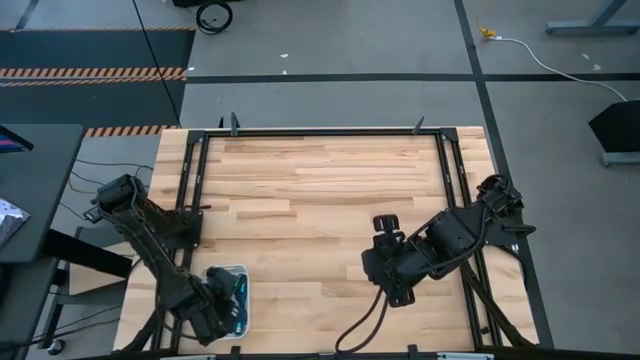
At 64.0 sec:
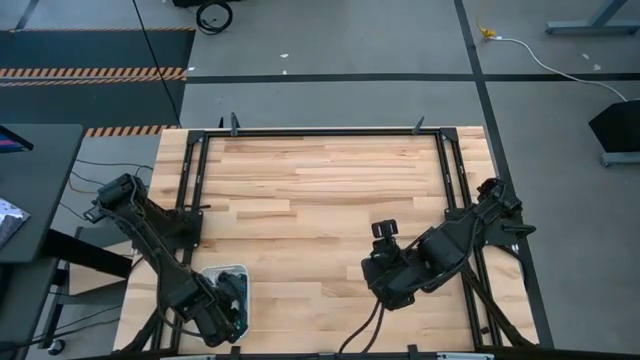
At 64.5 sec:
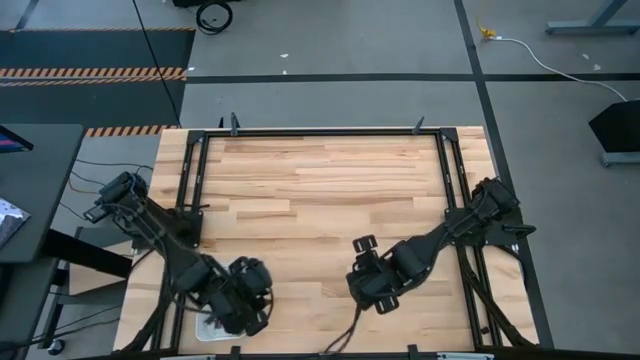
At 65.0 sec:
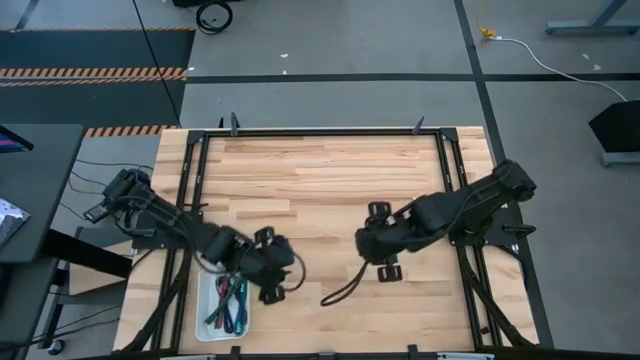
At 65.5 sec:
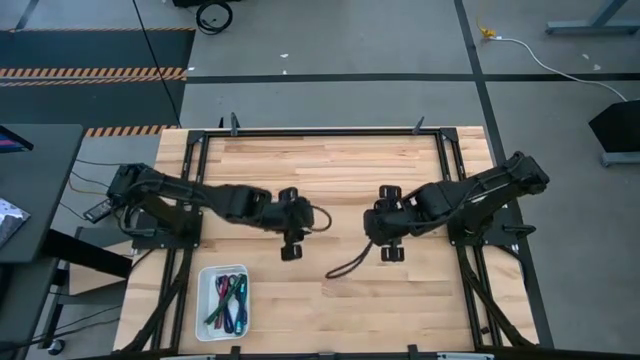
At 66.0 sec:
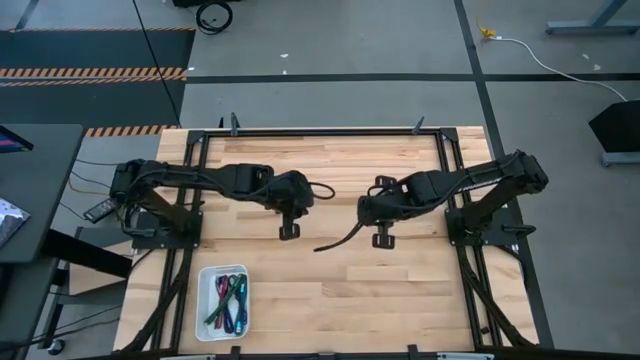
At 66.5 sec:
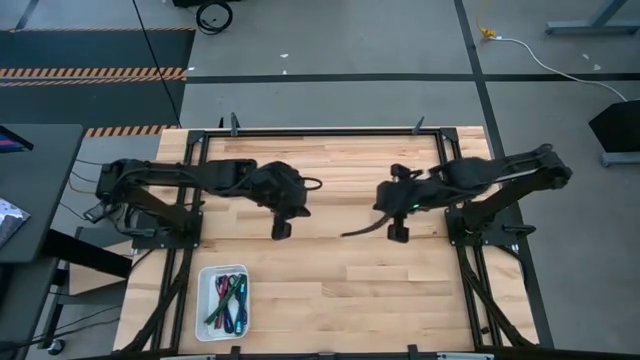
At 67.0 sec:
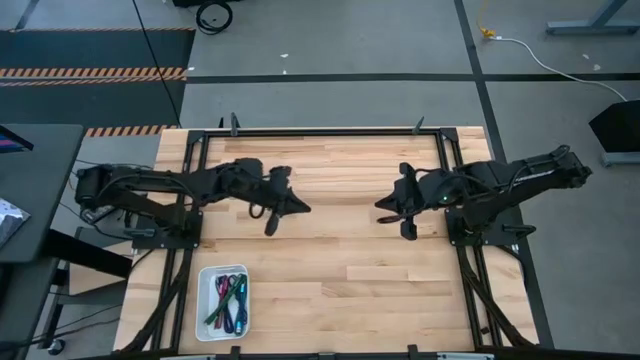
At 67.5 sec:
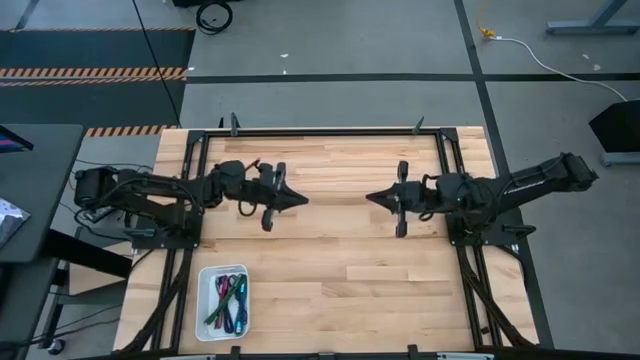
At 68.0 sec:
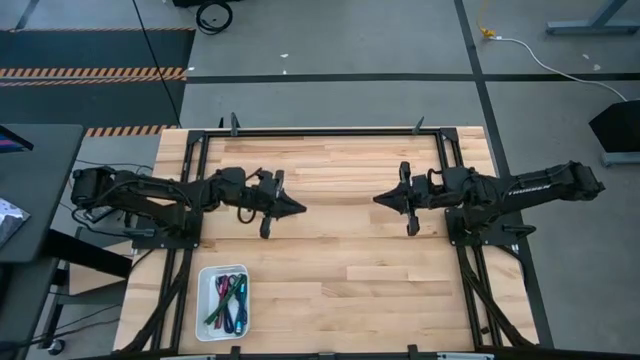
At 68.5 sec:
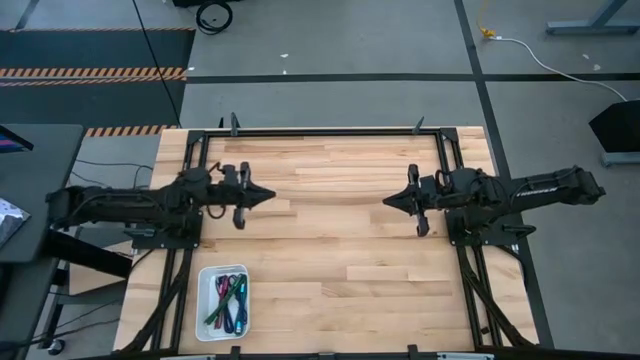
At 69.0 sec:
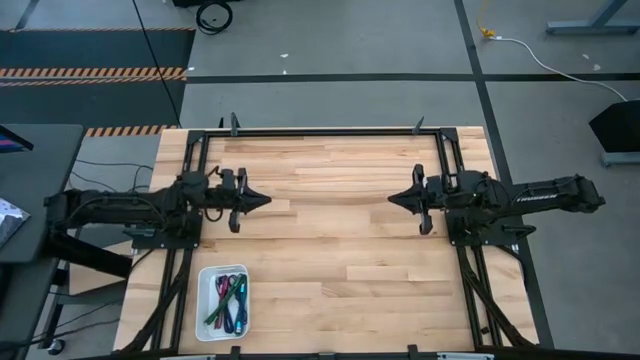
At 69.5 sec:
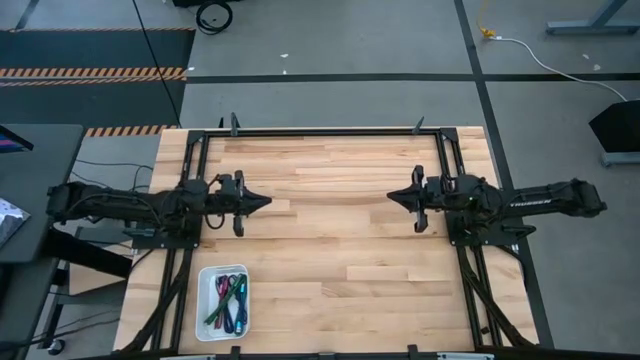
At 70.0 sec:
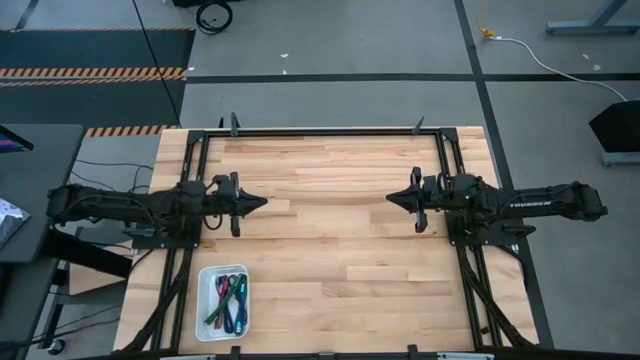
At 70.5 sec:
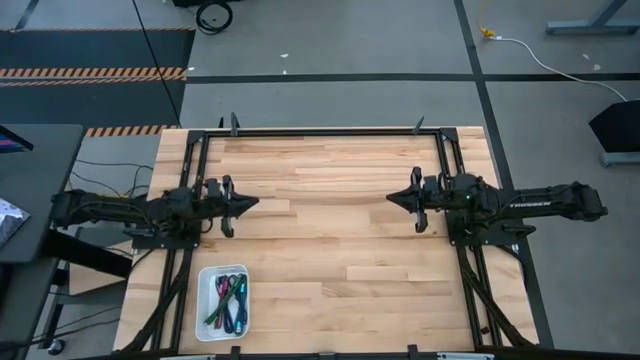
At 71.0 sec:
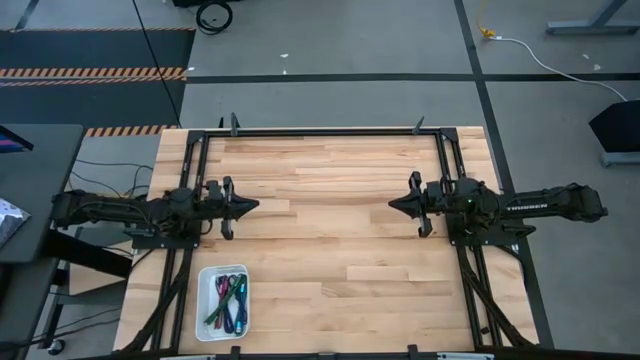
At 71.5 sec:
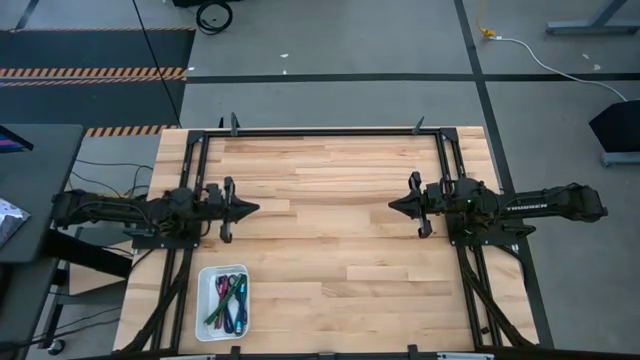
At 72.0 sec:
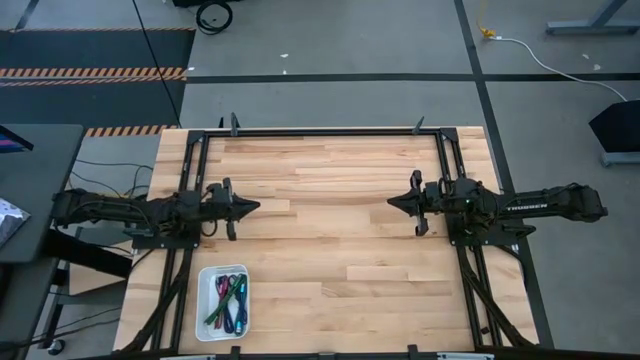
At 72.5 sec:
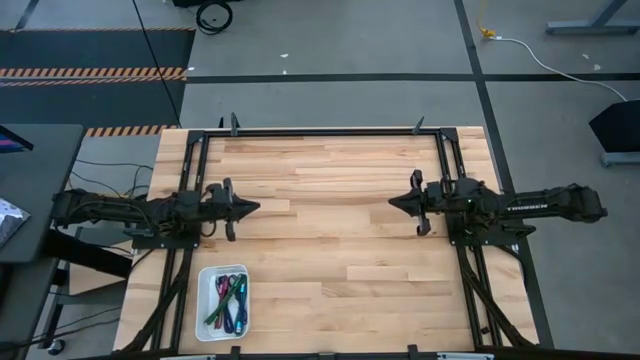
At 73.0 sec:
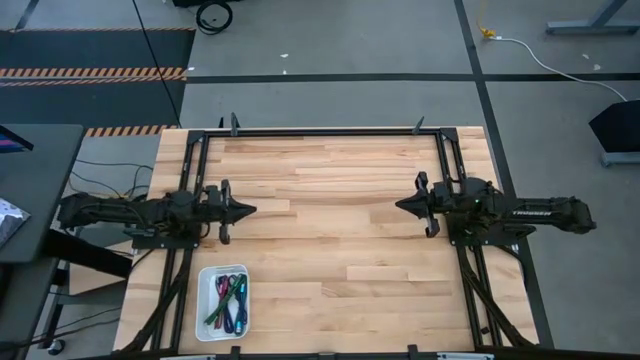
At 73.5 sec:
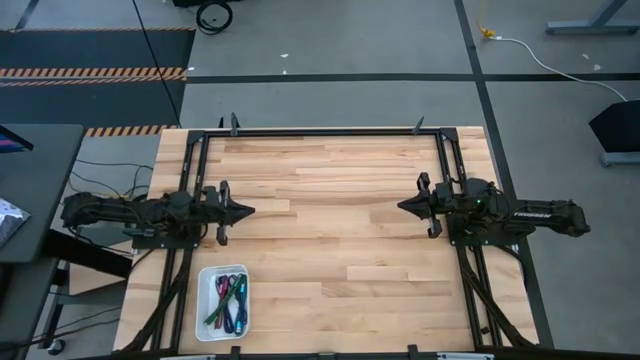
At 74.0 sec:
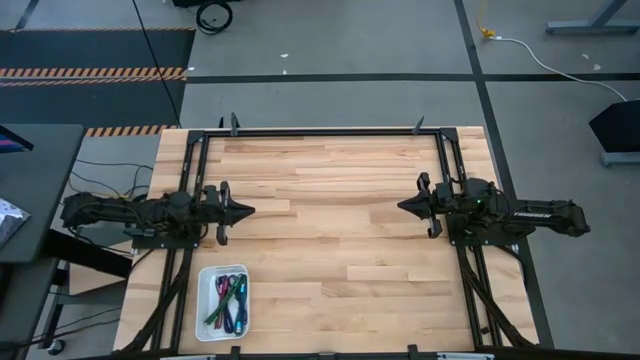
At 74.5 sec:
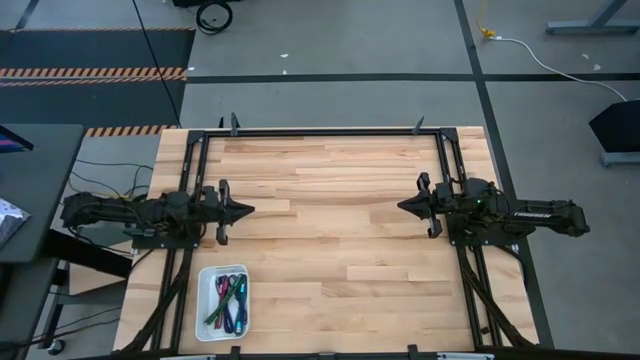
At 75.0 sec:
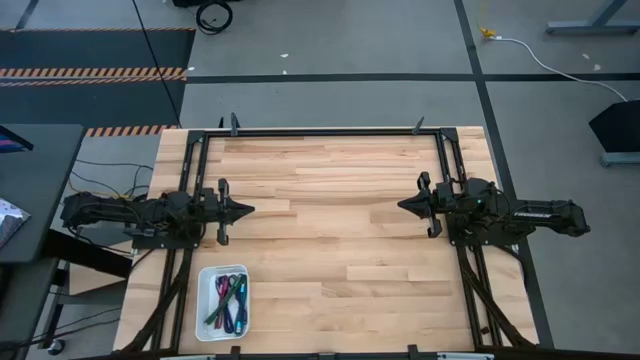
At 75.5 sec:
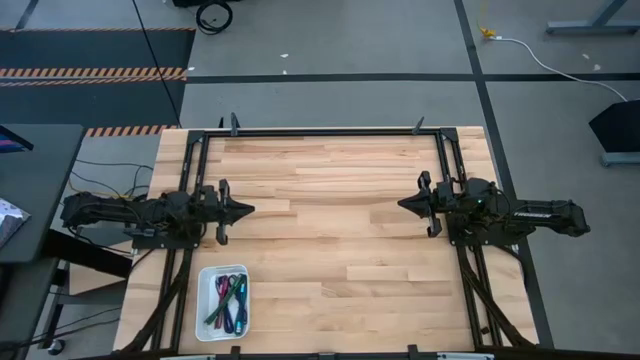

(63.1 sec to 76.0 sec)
Task: Pick and place USB-C Cables
Move the bin to the middle of of table

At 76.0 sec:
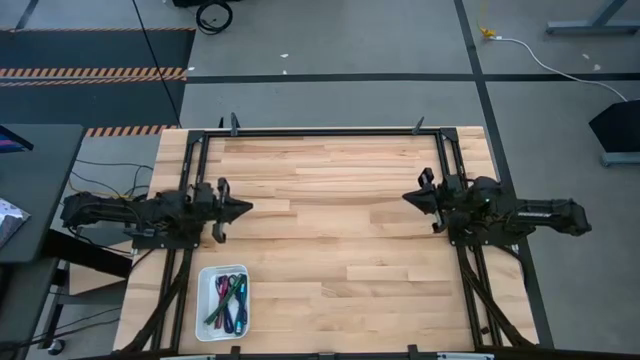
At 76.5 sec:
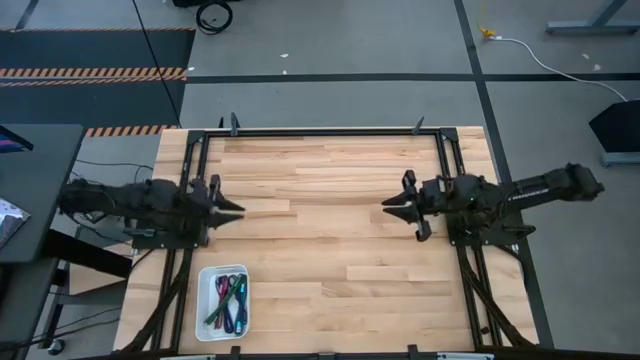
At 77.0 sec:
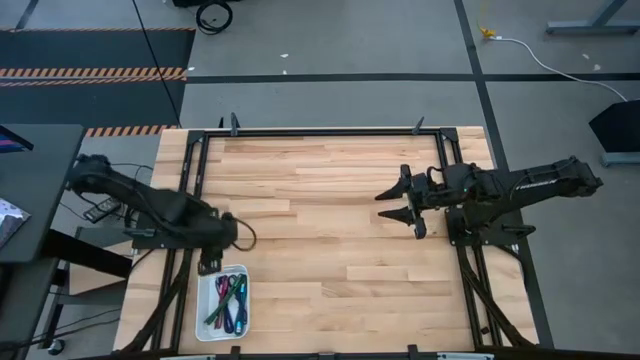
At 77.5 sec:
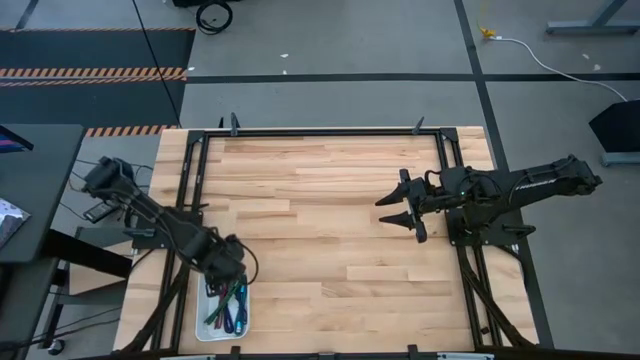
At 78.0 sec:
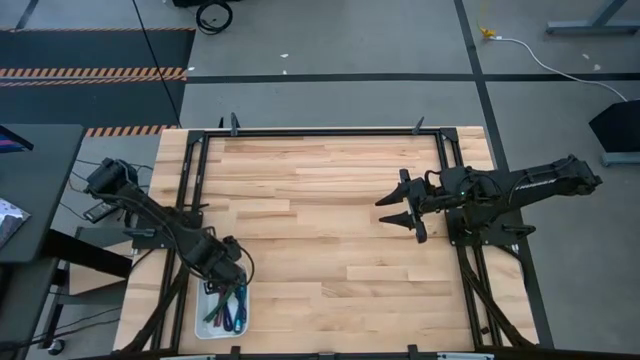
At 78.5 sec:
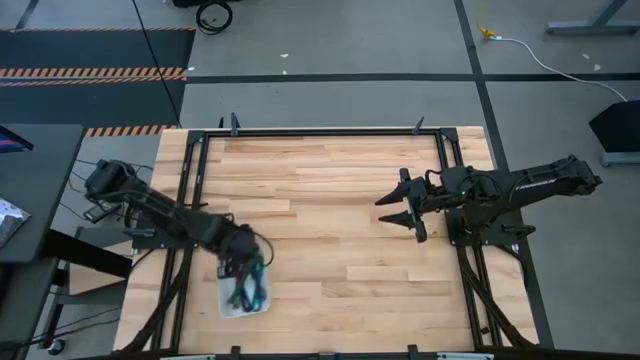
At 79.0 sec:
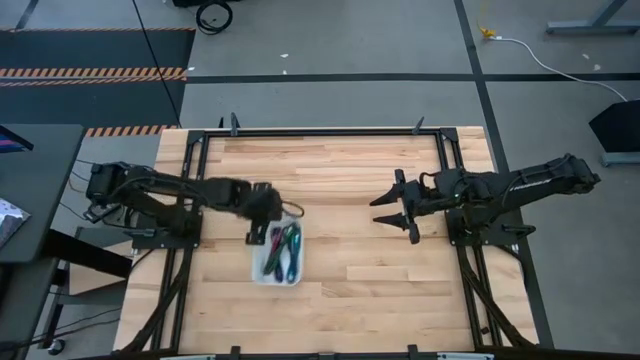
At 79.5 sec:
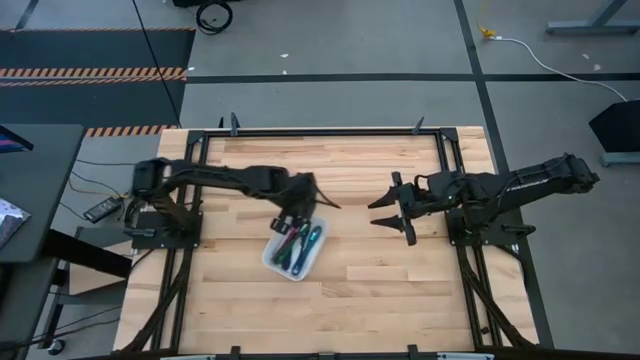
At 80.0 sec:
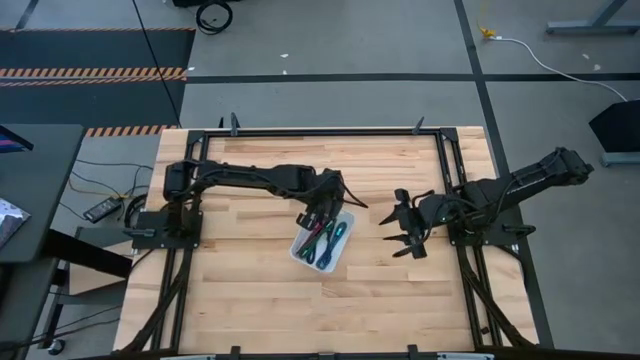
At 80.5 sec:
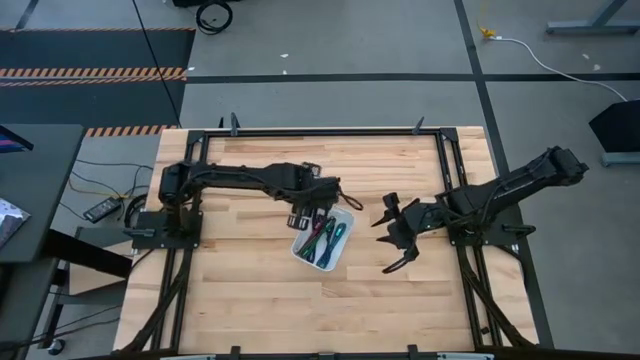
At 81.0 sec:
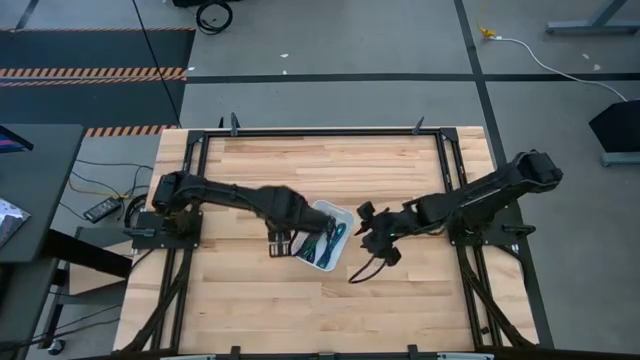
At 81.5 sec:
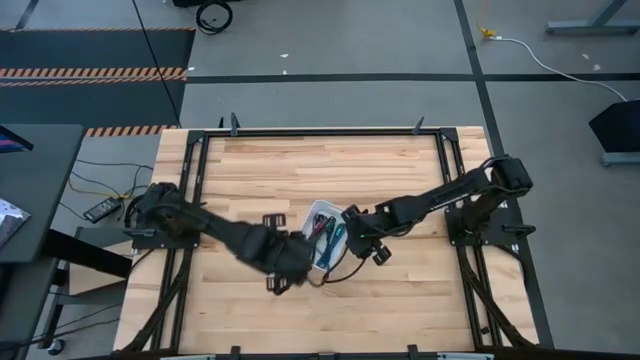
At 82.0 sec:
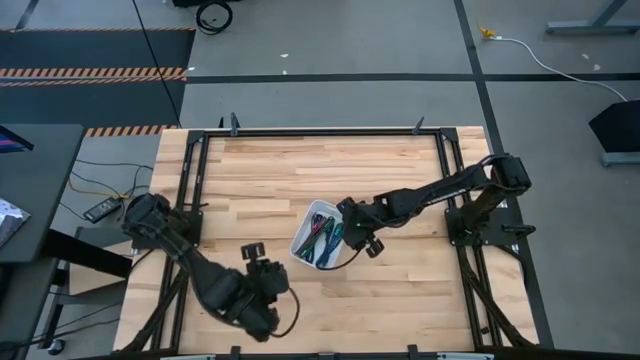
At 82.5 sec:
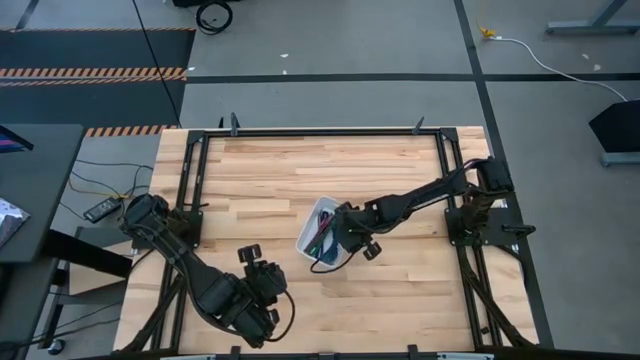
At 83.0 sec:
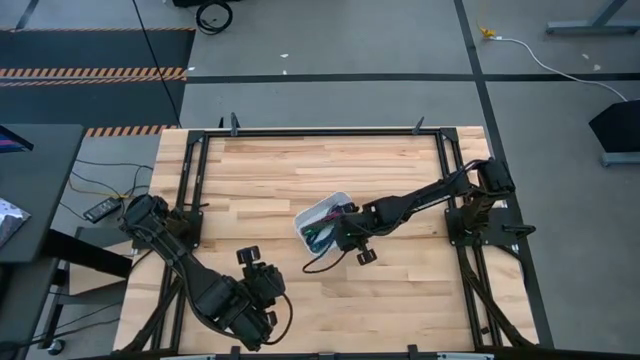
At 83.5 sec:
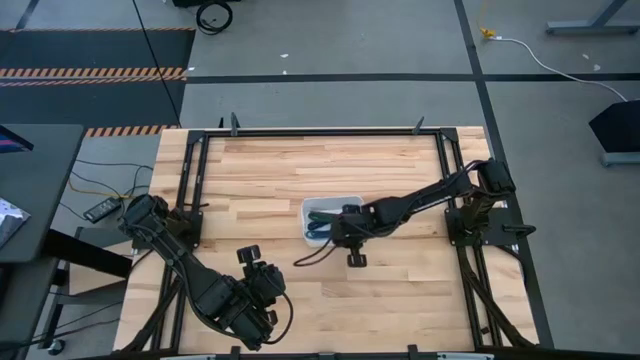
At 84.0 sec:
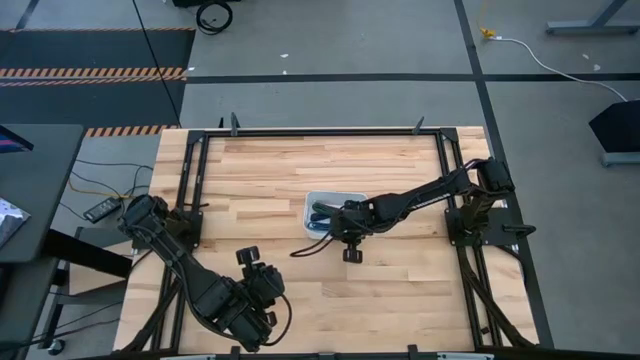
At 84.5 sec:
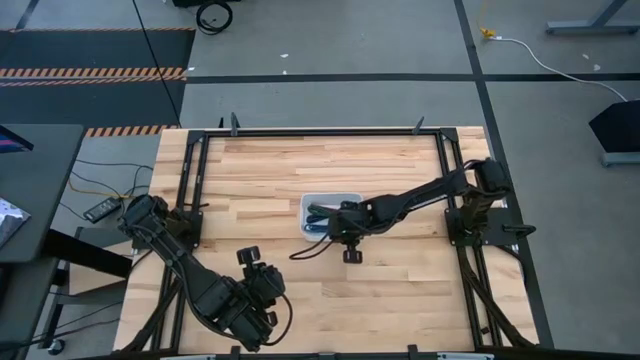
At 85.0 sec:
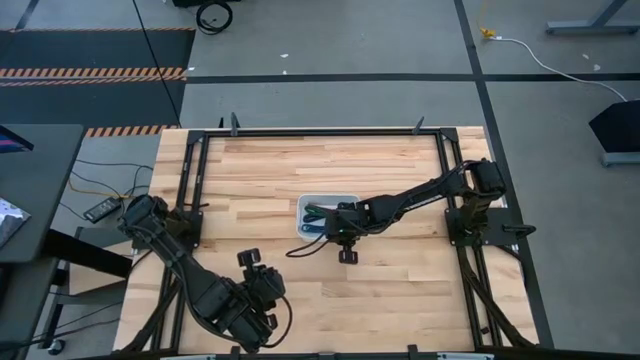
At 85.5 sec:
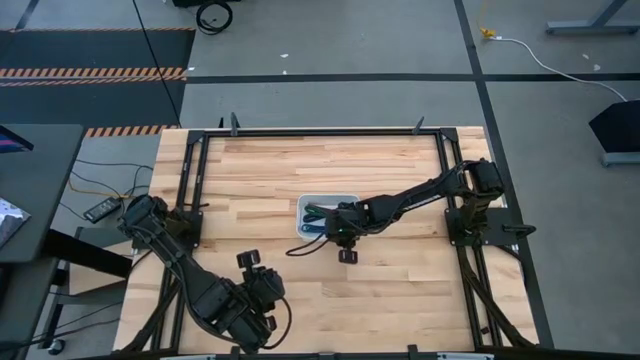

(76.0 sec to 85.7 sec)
Move the bin to the middle of of table
